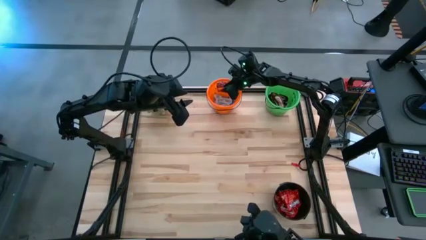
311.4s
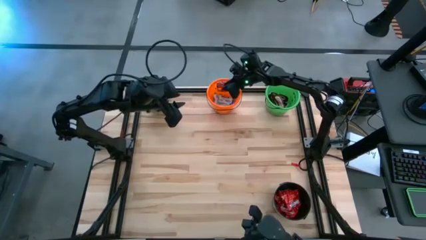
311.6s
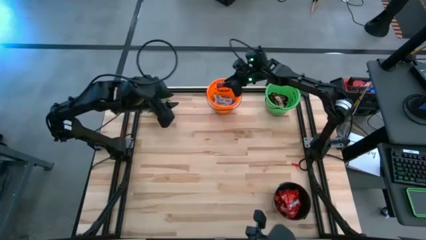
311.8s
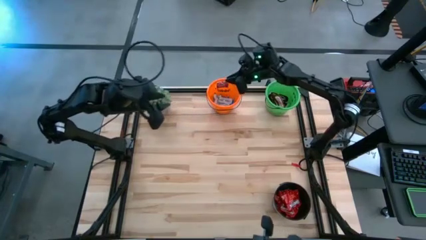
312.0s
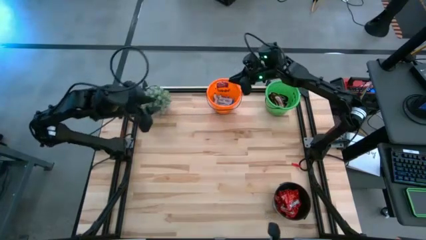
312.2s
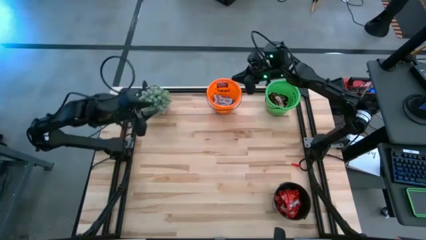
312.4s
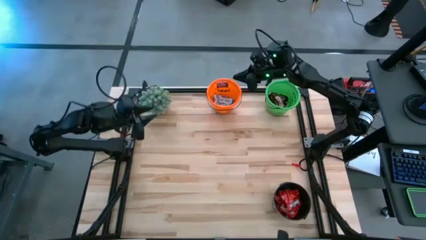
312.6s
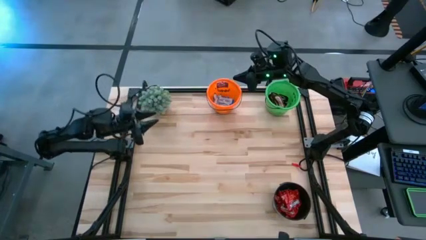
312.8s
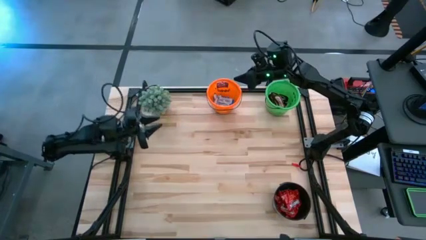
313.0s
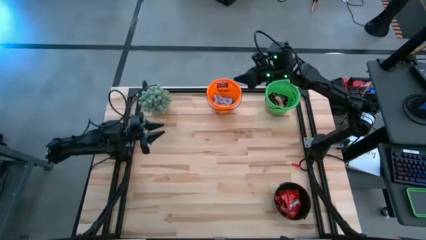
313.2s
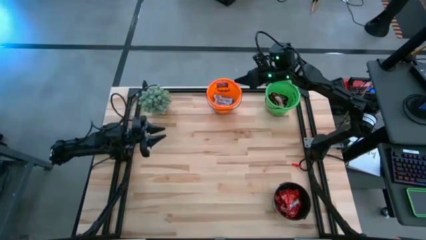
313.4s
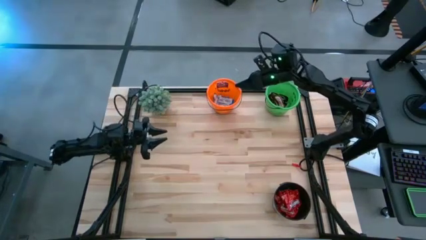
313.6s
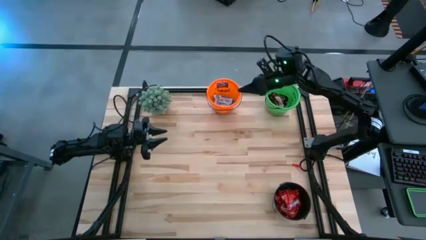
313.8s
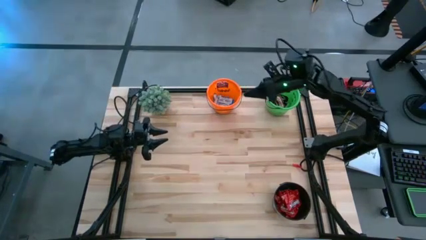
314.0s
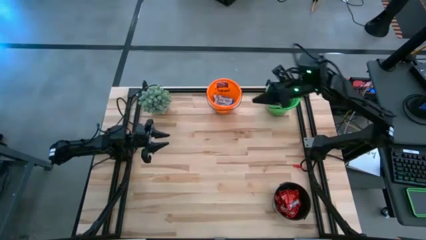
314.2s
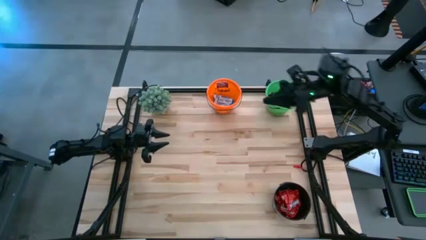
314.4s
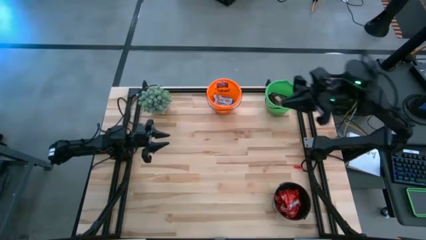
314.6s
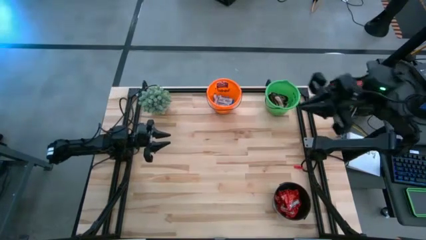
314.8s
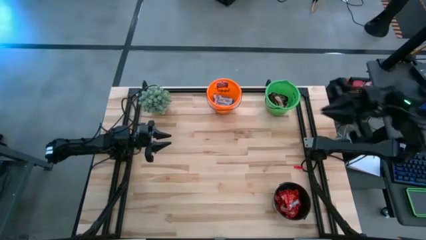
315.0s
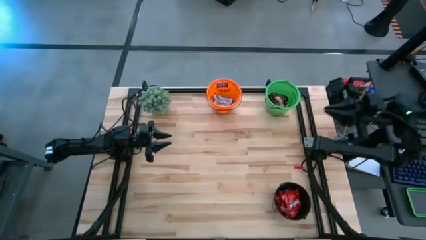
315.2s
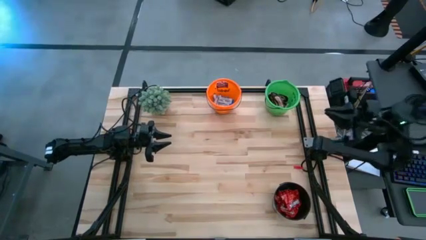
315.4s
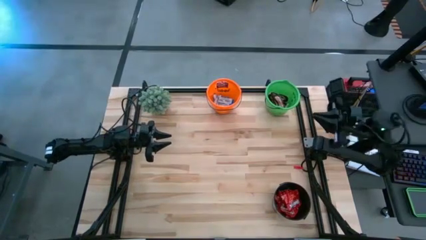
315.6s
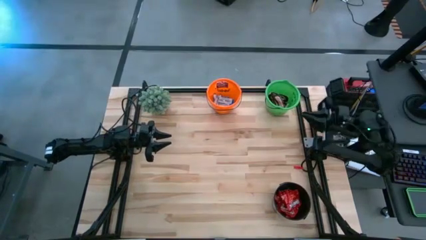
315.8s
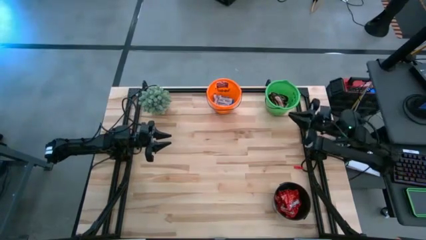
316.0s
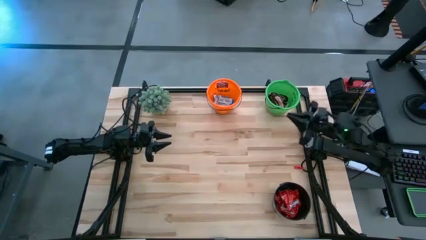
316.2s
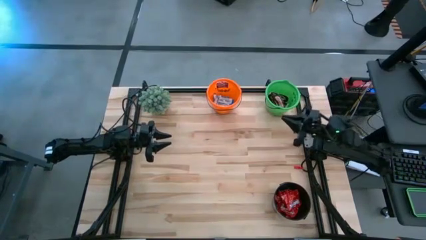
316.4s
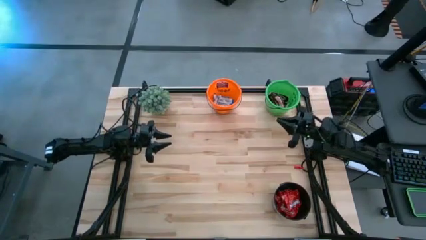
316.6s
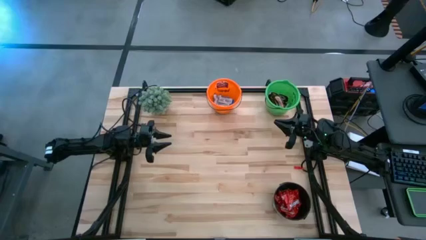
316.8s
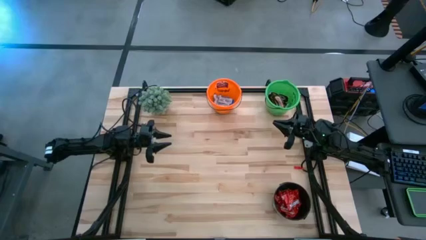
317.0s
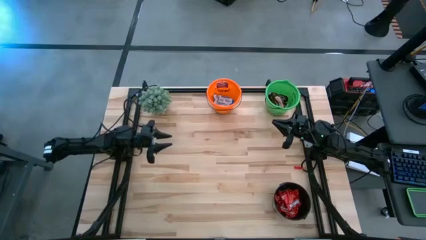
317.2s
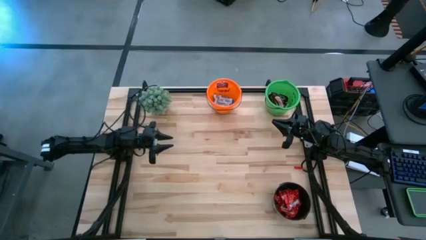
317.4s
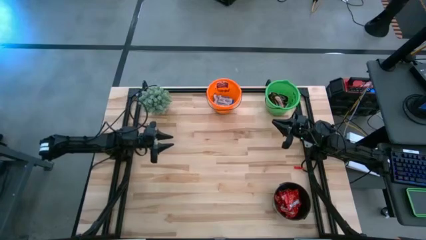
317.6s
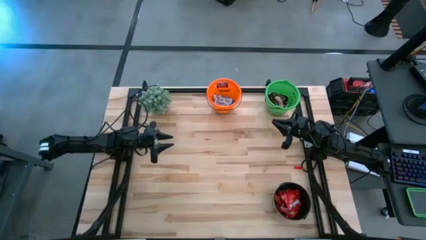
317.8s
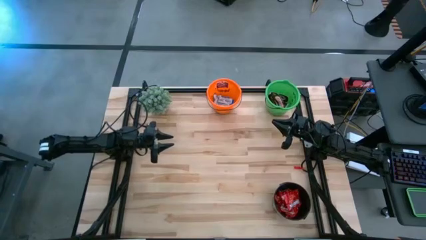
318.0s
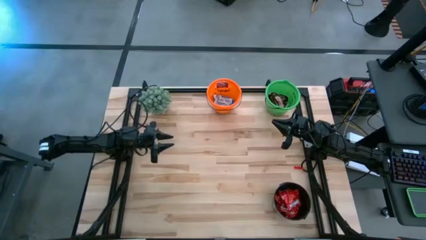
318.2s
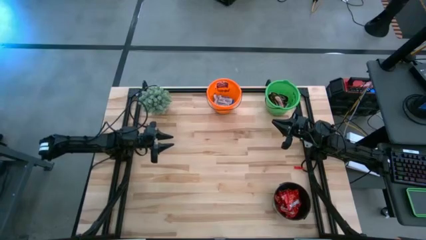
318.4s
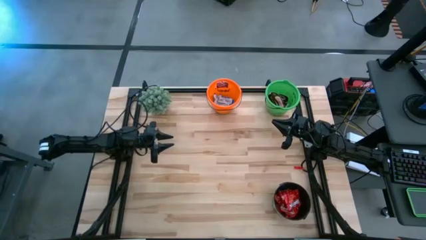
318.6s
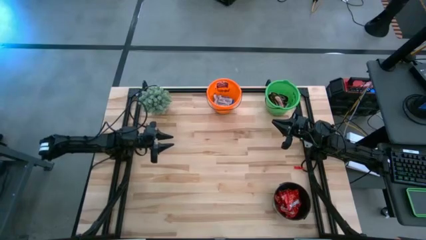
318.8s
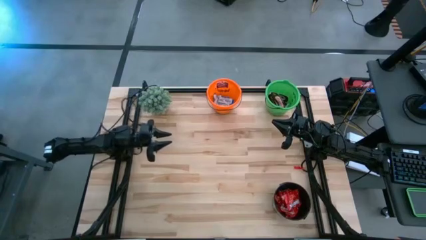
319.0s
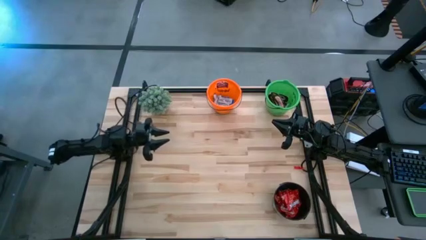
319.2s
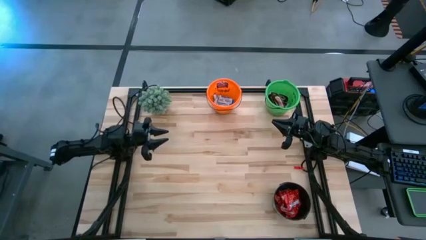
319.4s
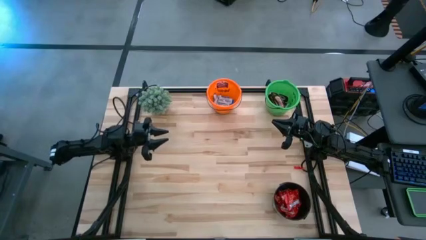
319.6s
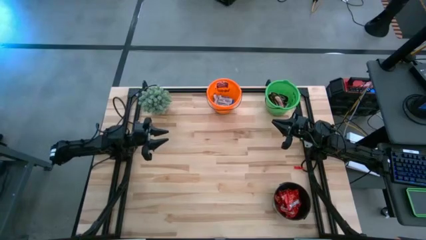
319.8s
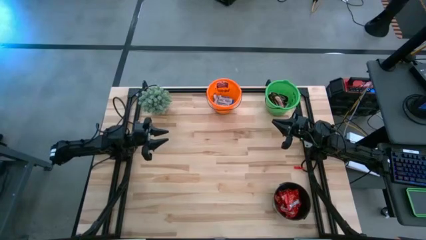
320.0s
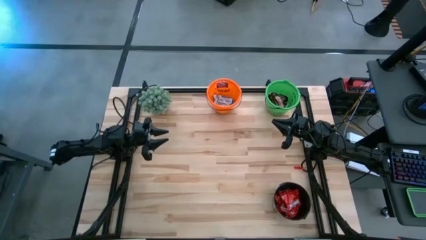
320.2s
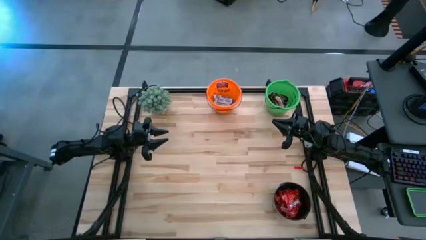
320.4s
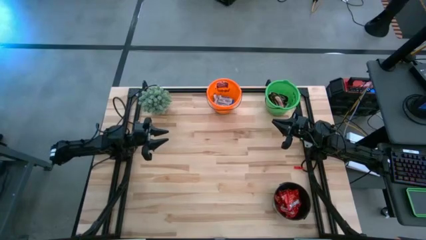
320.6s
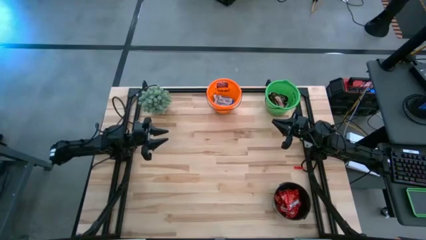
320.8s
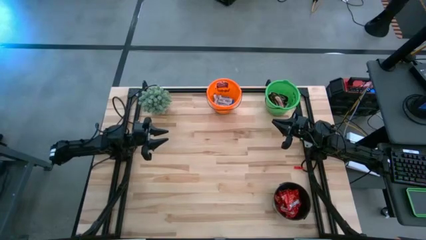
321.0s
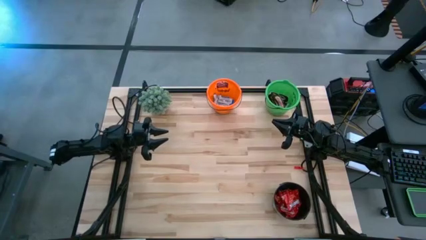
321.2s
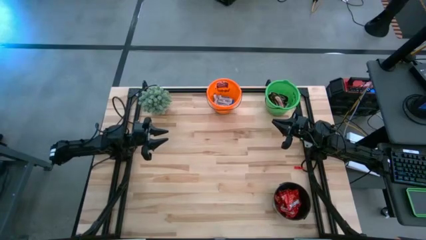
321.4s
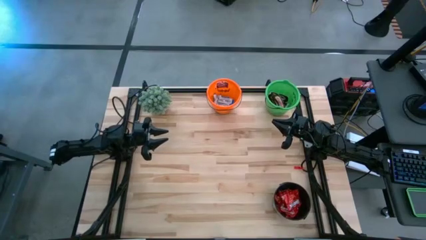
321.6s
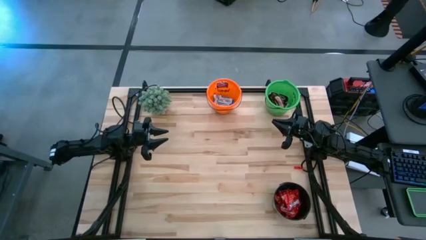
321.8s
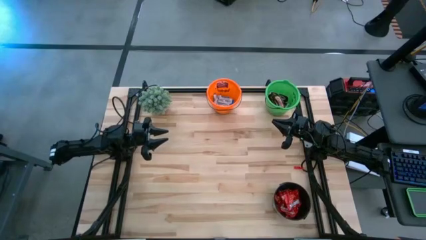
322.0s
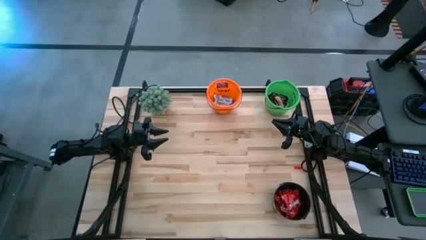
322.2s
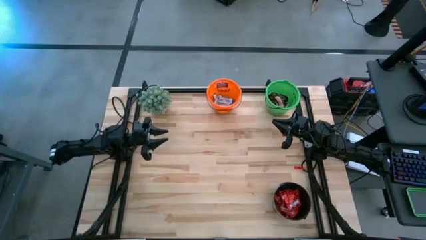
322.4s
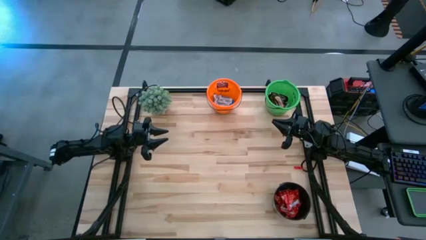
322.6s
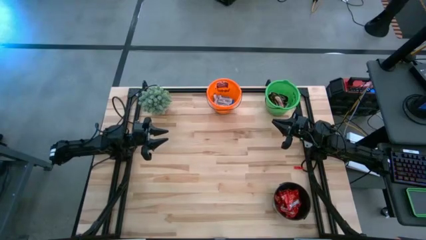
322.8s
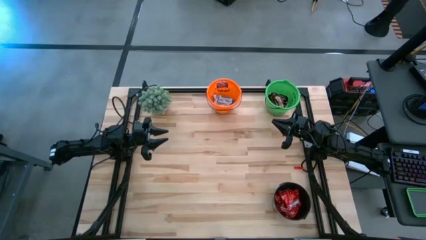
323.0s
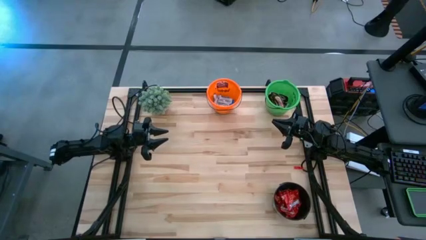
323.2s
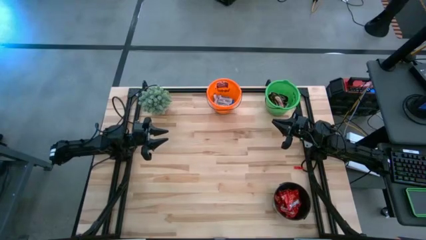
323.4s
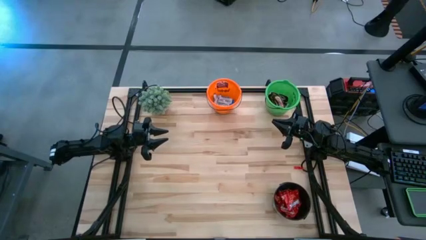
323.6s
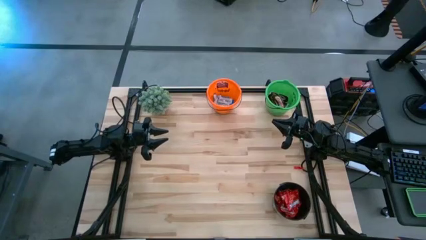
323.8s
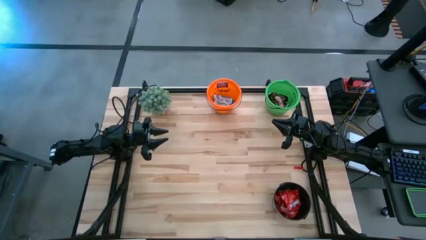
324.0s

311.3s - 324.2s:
Task: Organize candy in baskets
Return to Home Position

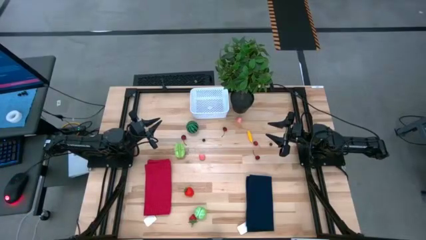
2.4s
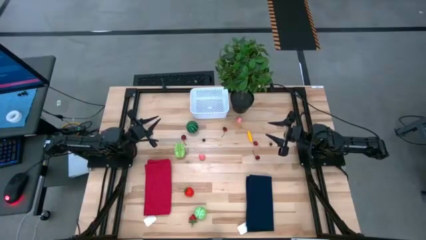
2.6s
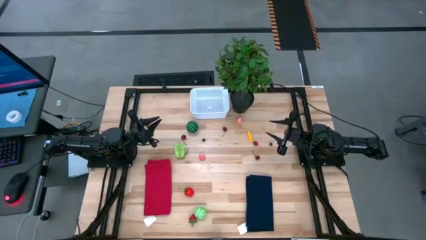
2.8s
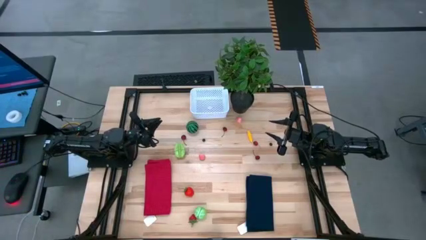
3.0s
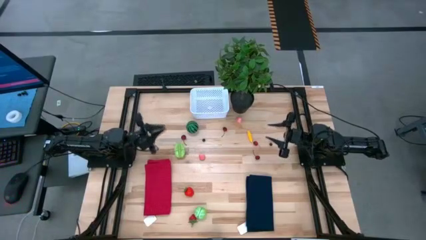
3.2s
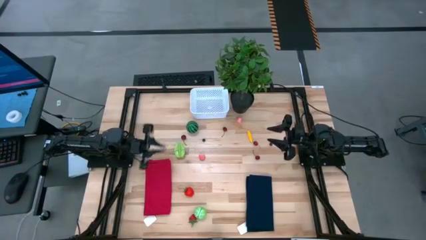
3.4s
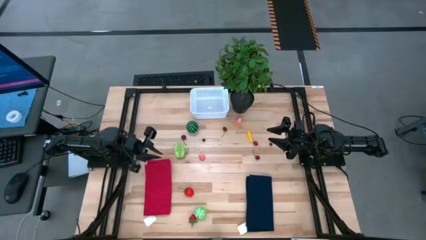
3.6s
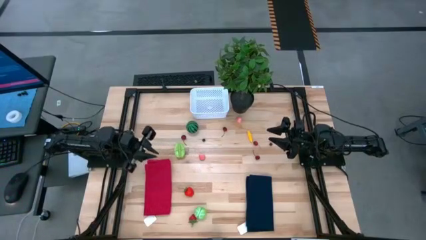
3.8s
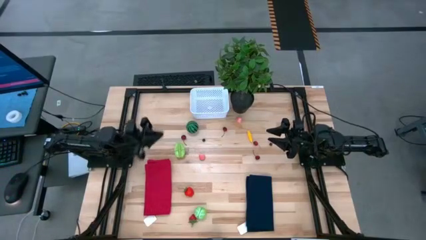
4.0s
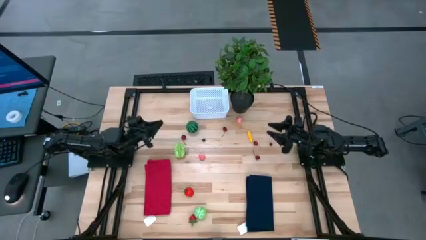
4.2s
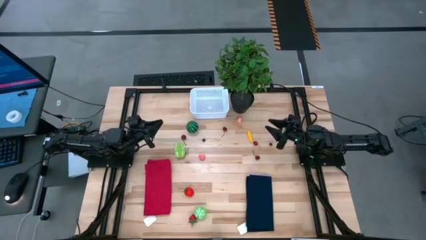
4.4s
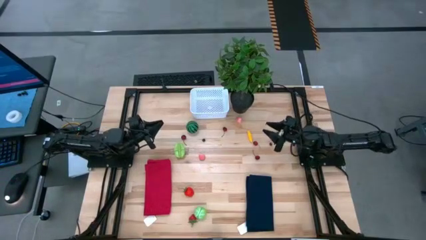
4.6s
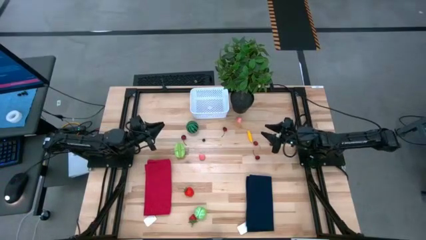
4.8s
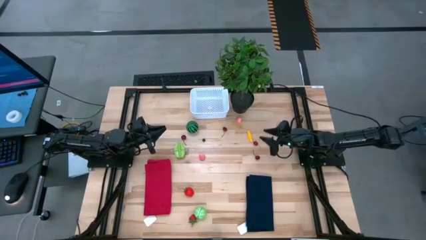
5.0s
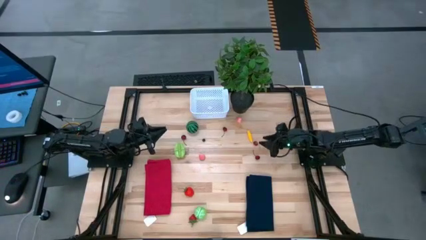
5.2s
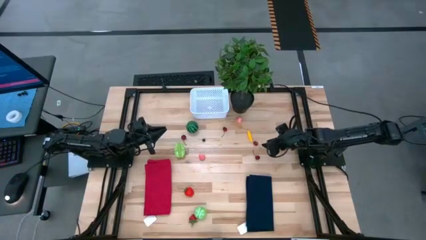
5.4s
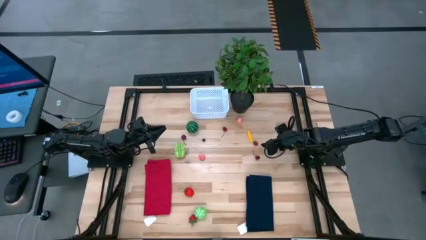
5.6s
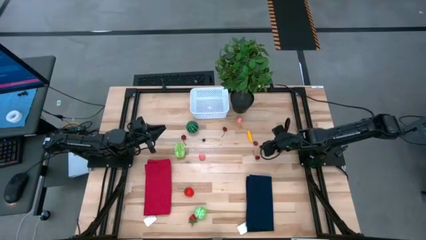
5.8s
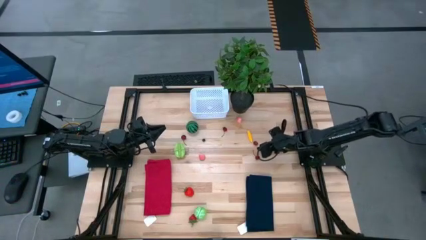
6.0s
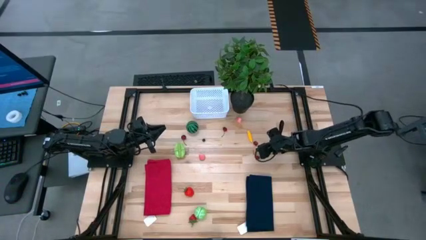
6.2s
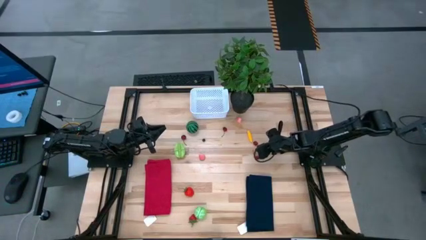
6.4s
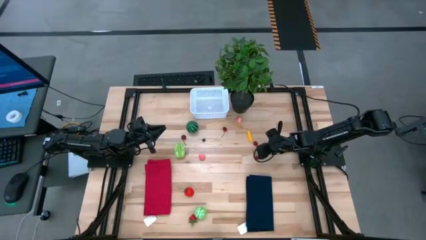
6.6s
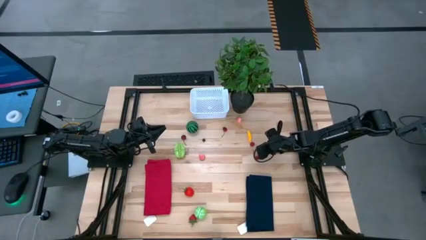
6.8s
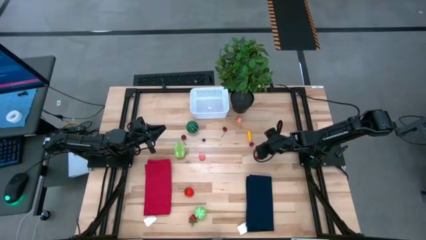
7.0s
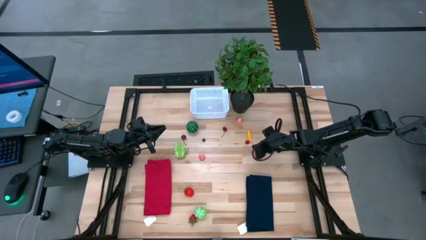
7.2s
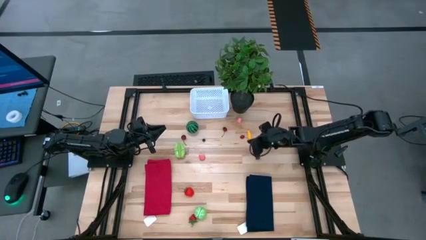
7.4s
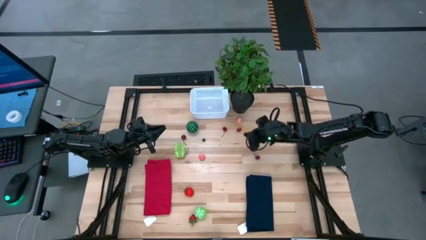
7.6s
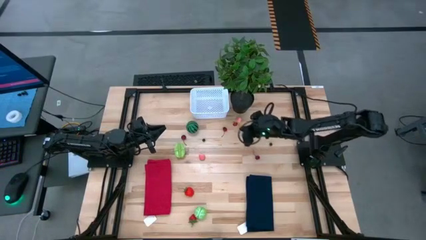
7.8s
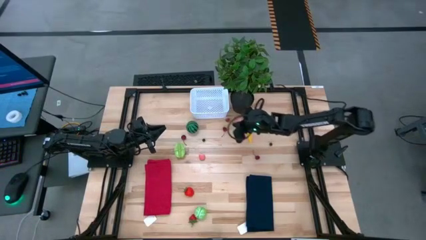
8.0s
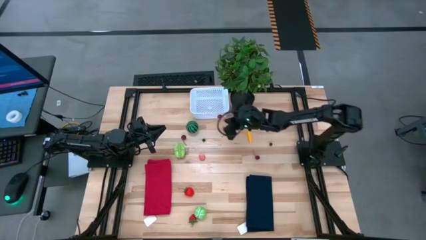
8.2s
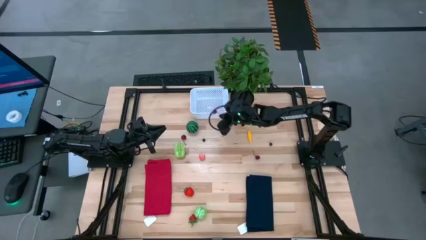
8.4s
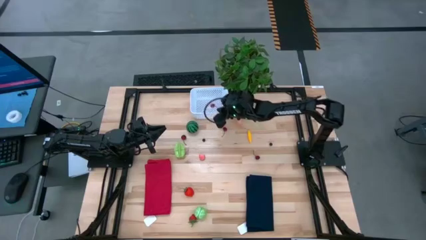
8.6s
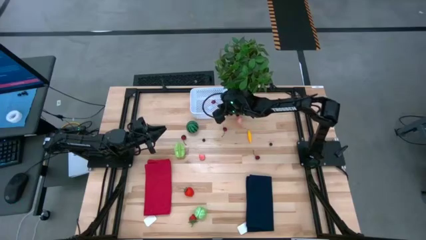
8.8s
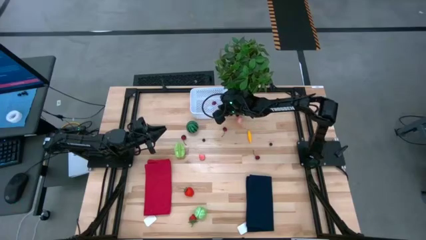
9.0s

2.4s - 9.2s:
Task: Pick and placing Produce into tupperware
Put the red cherry into the white basket
